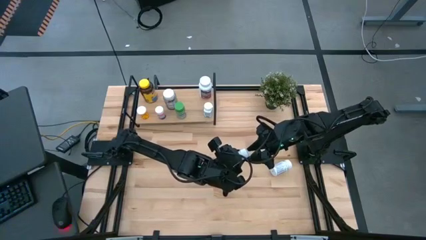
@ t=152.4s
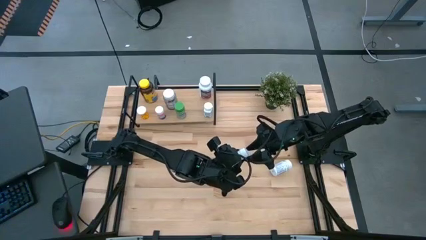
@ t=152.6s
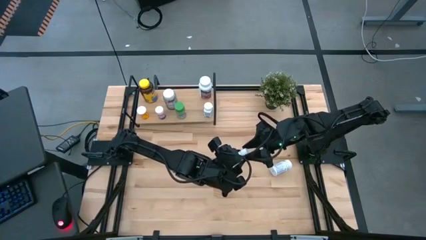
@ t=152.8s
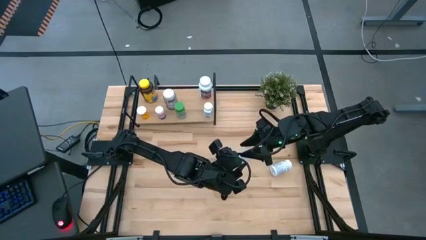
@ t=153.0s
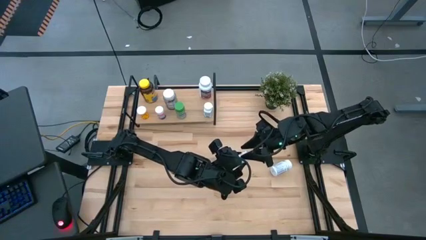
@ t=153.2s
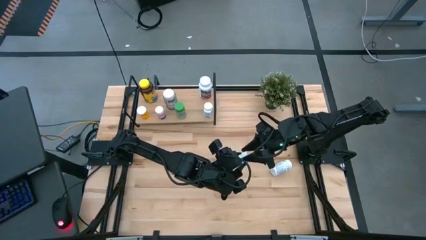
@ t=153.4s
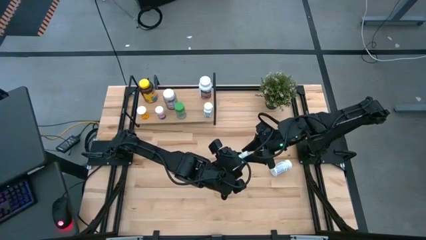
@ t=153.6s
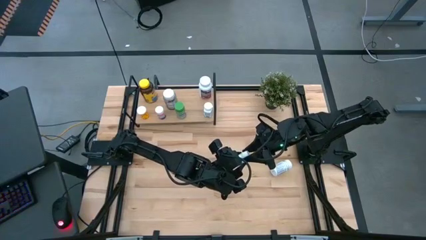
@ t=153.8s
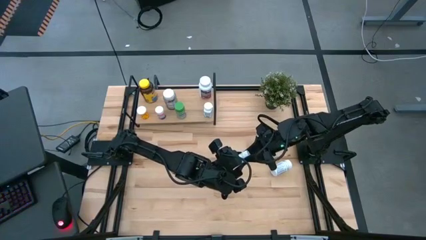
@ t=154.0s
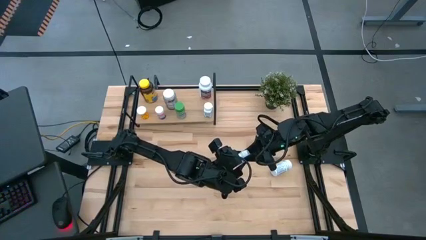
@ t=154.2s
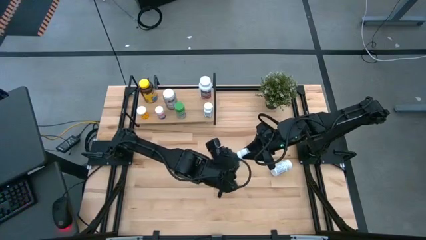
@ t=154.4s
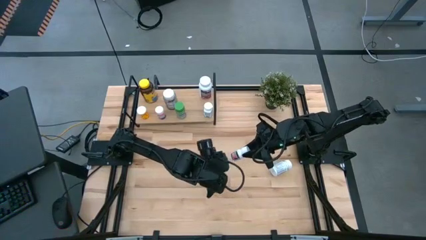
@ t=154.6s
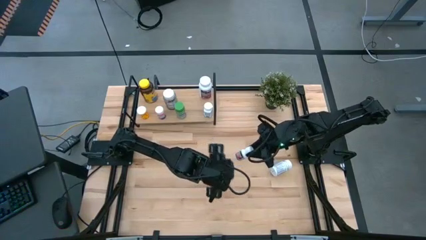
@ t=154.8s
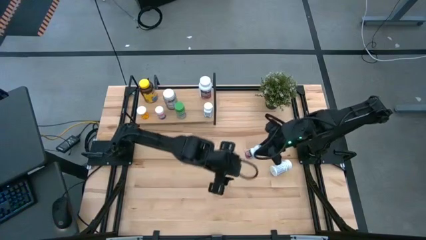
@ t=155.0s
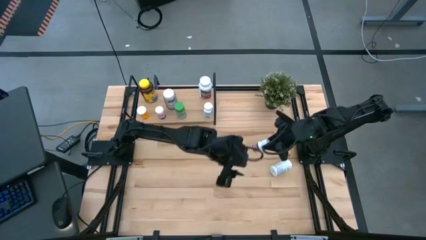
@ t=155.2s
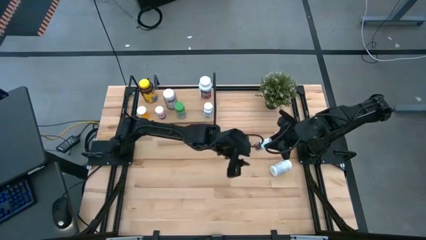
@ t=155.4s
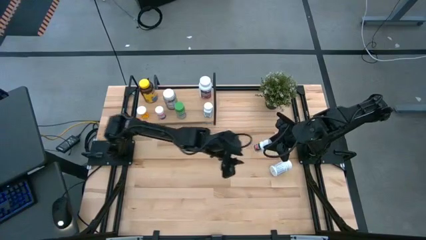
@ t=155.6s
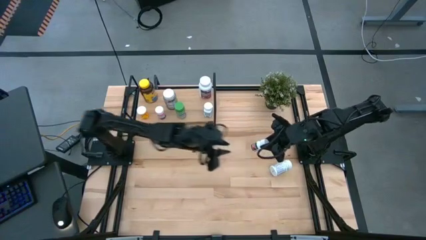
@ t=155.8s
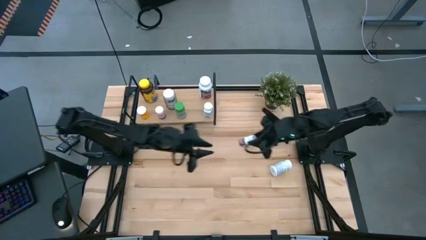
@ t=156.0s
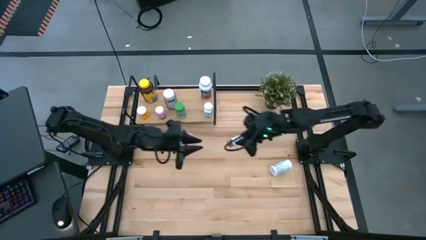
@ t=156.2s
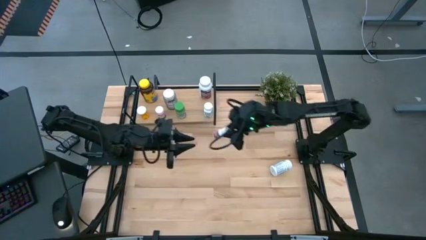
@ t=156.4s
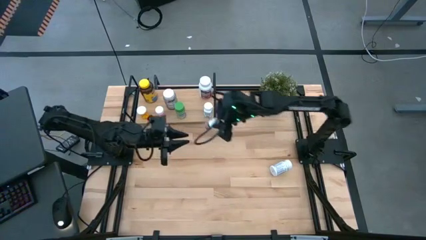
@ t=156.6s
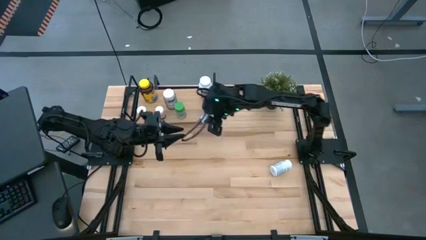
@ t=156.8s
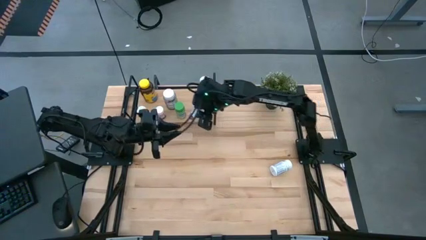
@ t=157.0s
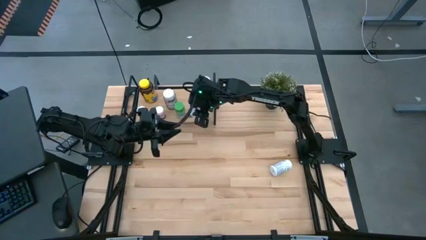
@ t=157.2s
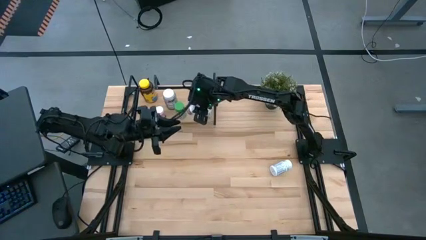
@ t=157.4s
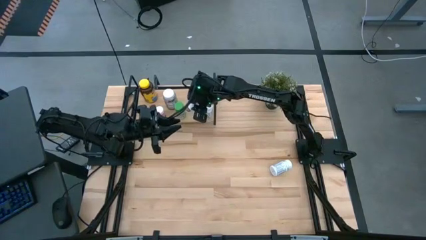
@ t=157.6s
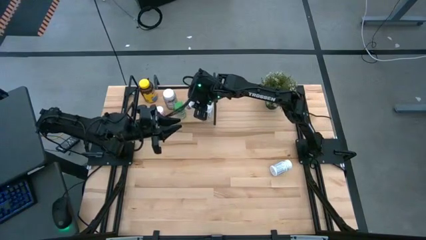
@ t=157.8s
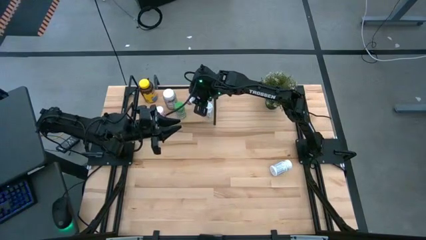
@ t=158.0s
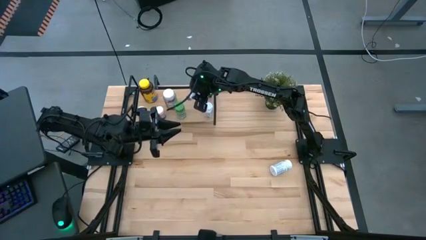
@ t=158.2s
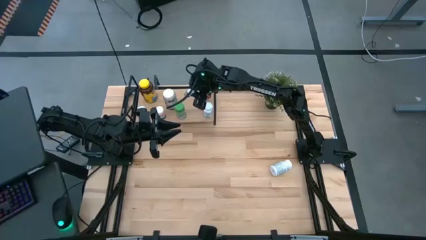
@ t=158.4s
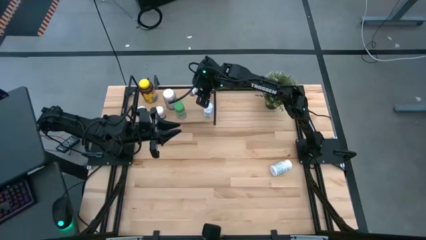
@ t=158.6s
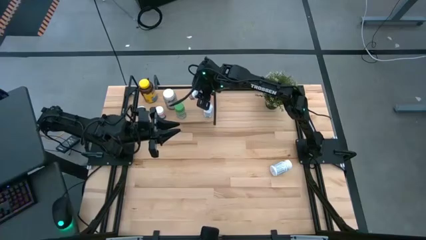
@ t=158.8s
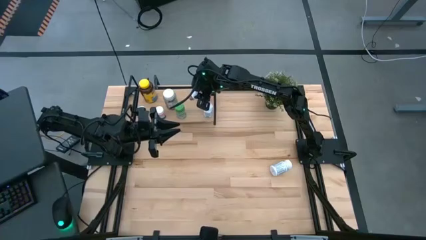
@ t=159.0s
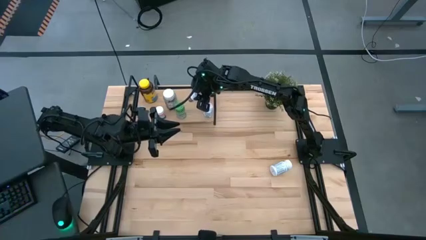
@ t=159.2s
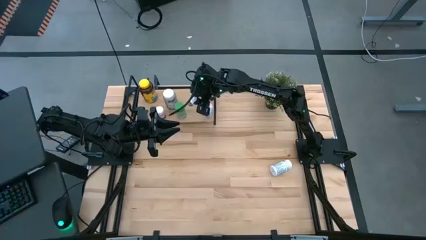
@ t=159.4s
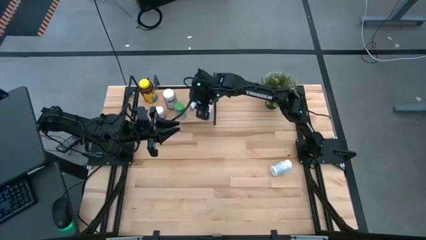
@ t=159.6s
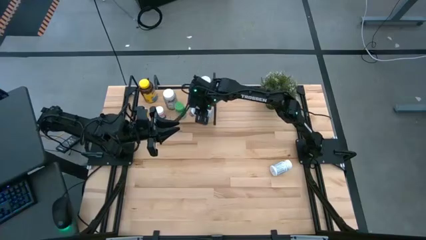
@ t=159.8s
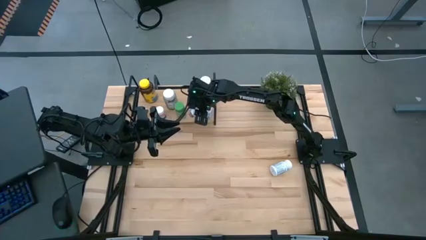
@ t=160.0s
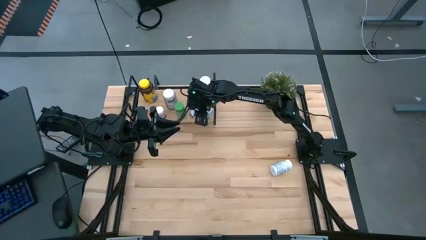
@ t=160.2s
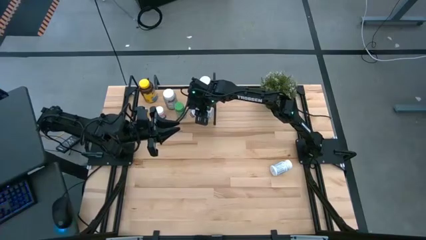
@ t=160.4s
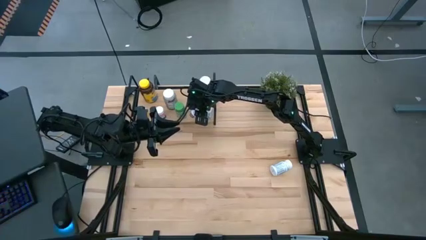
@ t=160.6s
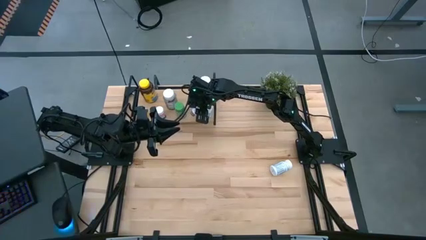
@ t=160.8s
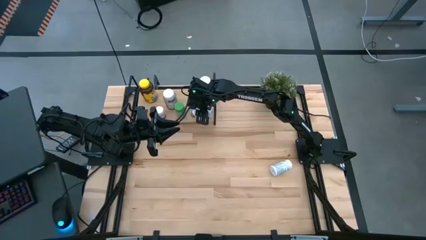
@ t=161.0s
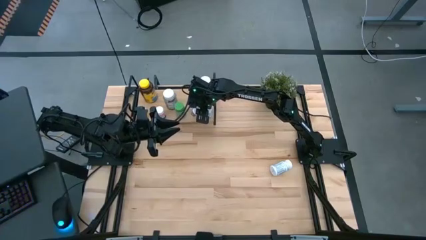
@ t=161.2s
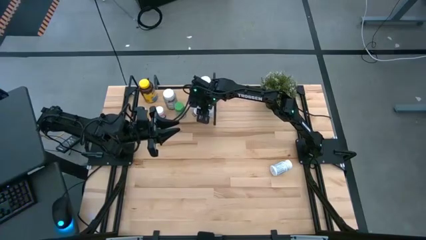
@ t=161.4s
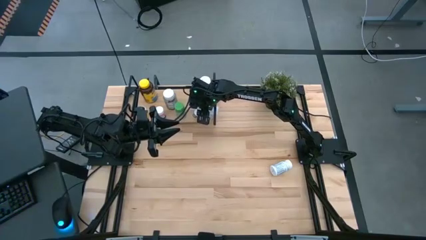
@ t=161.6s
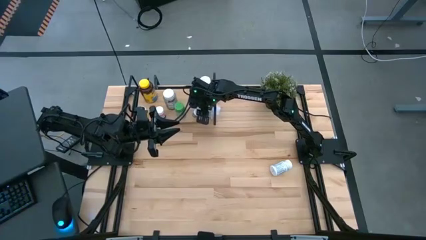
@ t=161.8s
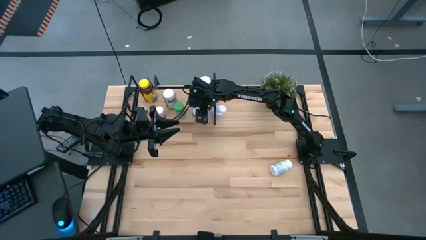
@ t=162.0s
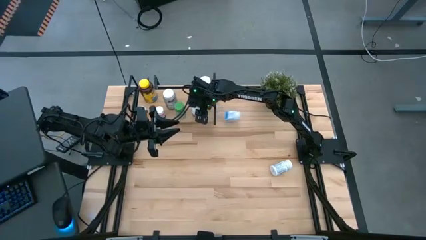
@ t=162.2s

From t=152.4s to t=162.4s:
Task: Pick and place medicine bottles onto shelf by color
Put the black medicine bottle on the shelf

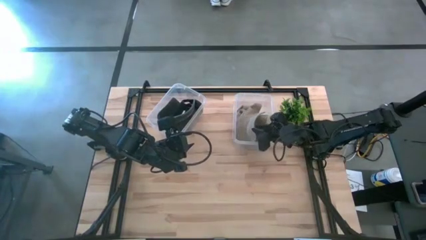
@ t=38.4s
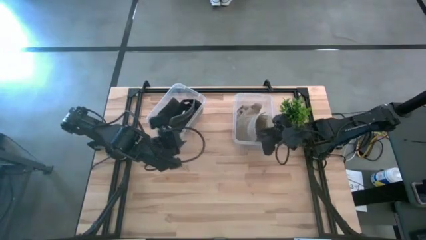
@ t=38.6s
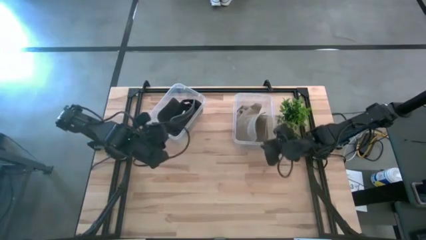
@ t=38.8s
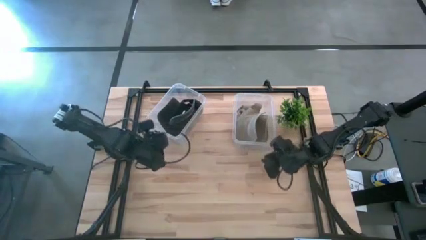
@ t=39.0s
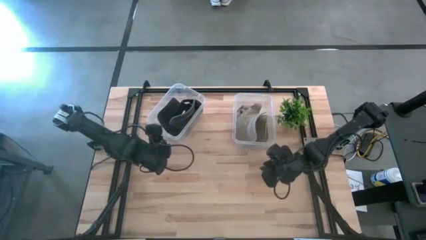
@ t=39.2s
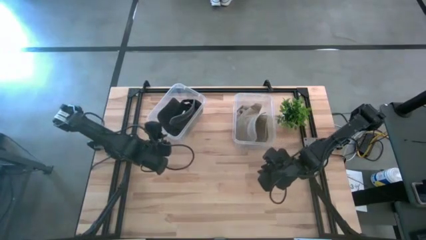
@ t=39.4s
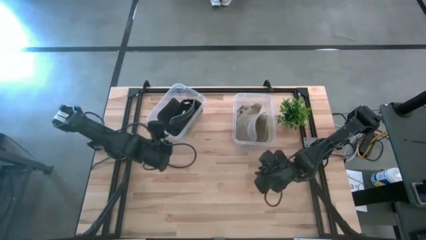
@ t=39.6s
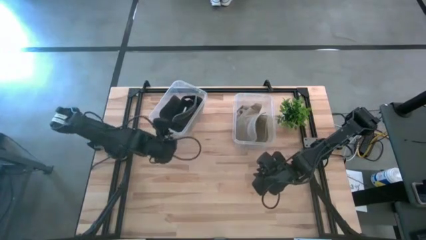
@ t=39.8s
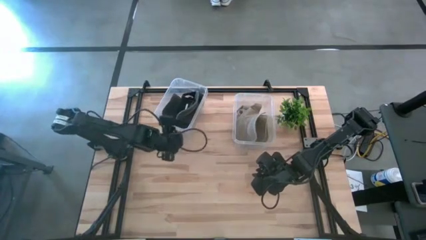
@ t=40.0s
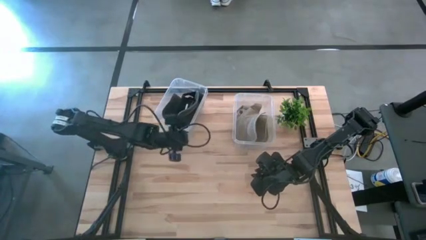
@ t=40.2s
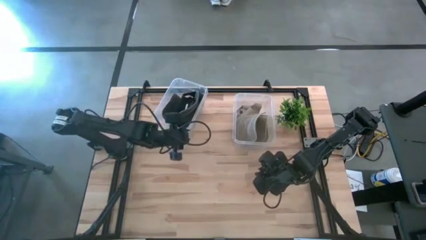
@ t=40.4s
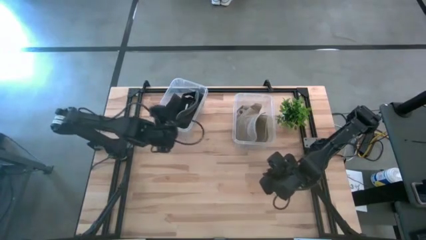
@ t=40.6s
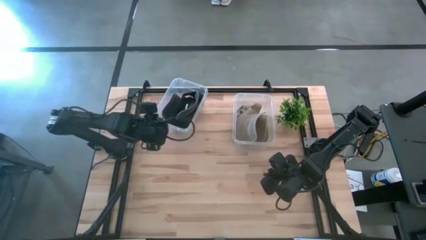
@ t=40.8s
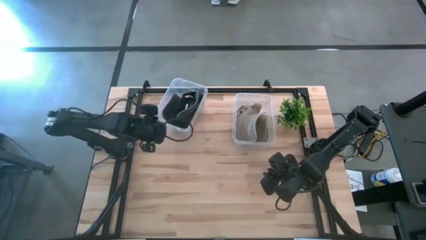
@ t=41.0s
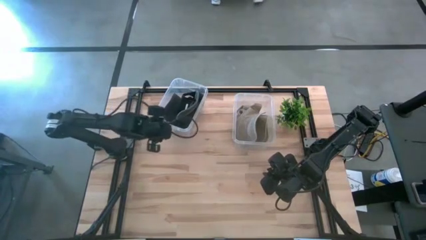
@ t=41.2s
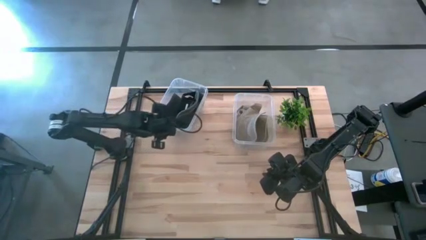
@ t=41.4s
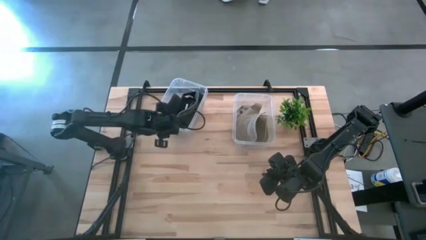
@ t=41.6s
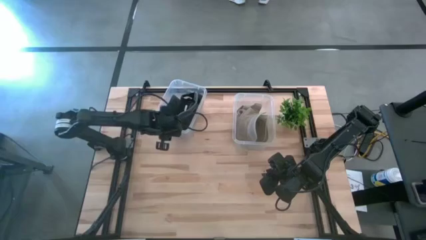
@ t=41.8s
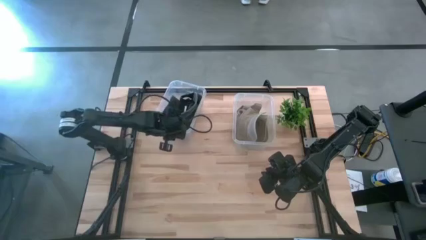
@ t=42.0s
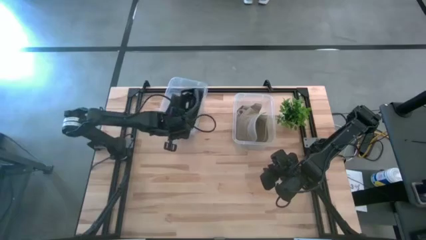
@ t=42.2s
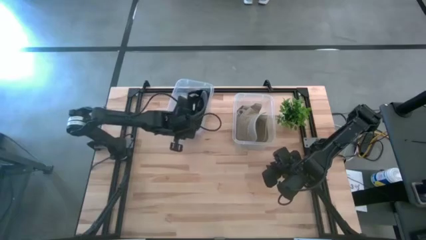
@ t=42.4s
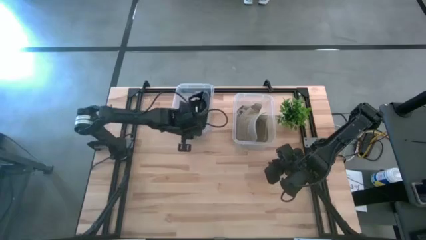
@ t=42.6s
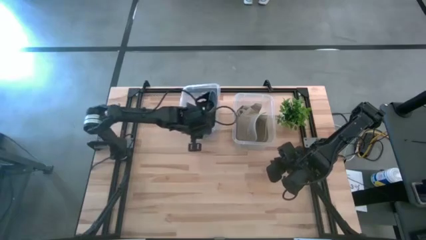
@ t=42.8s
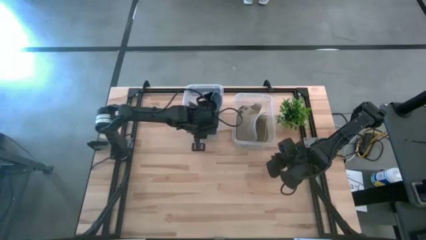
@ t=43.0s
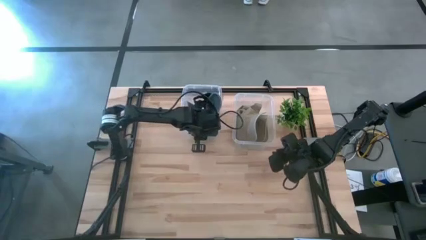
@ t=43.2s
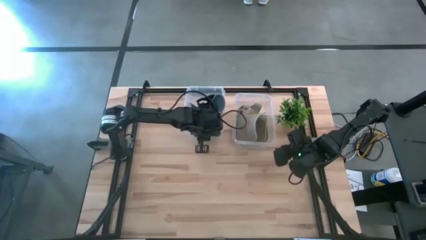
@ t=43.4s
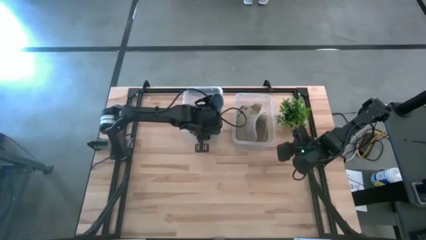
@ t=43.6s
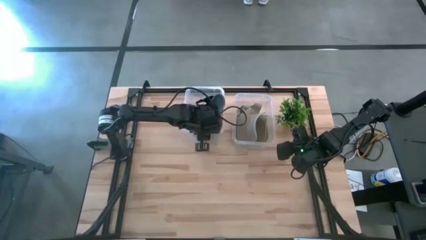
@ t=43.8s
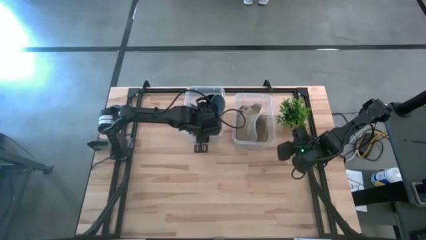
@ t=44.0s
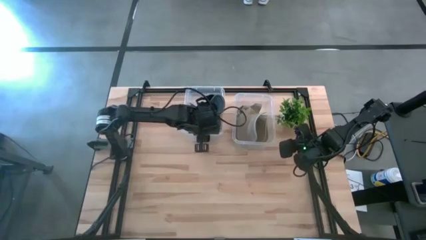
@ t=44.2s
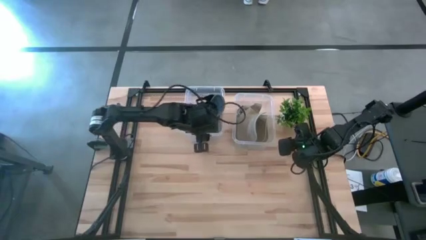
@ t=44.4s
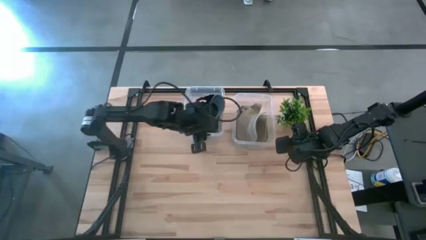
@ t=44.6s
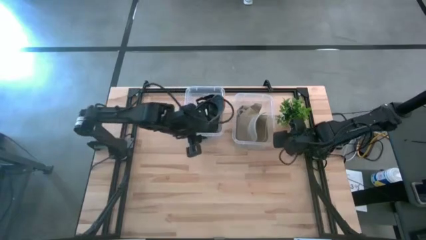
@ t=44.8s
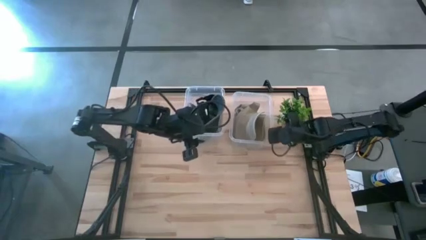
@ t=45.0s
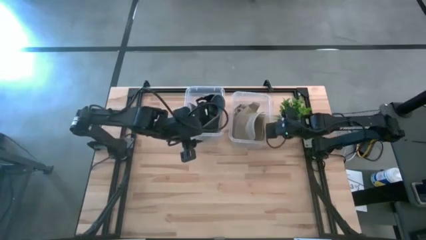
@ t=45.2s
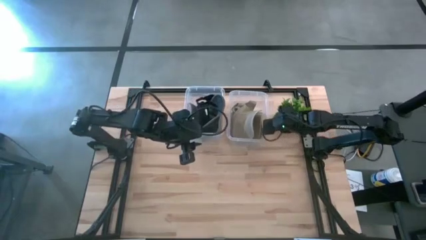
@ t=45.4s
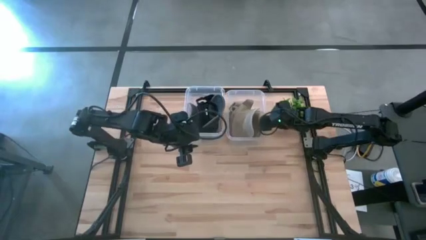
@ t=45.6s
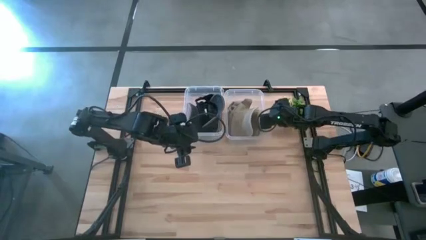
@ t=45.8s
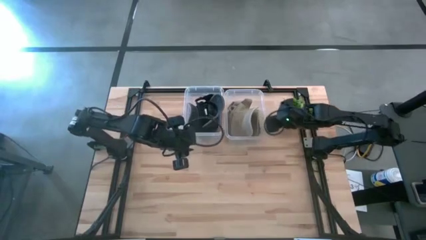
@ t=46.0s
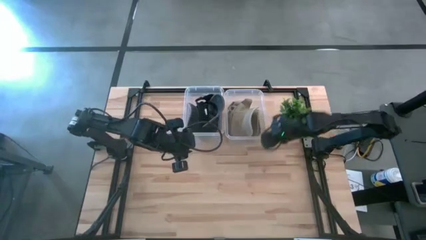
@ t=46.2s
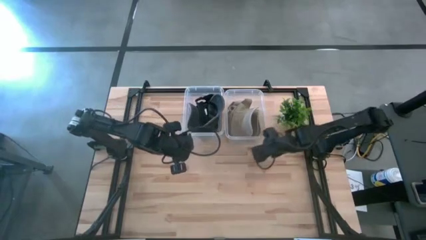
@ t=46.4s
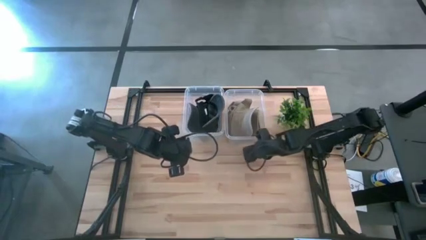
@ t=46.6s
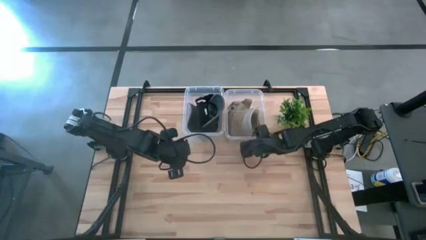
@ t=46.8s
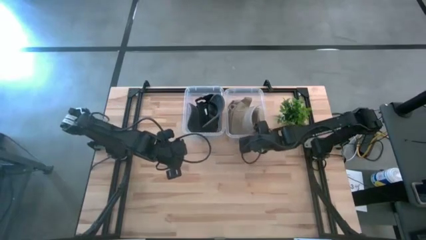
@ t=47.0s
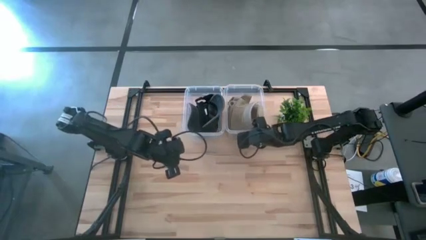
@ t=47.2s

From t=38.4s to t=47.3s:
Task: Pick & Place hat
Adjust the transparent bins
